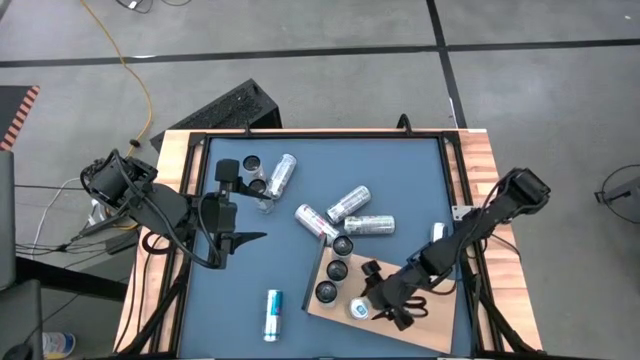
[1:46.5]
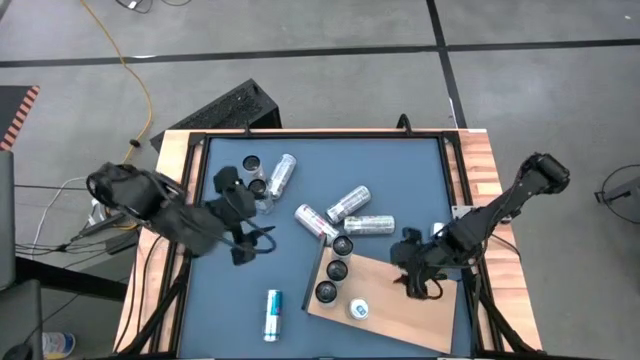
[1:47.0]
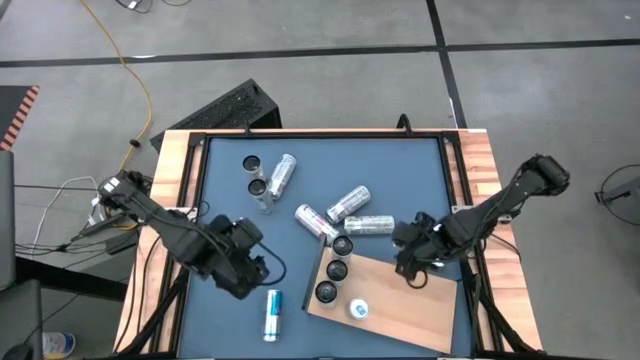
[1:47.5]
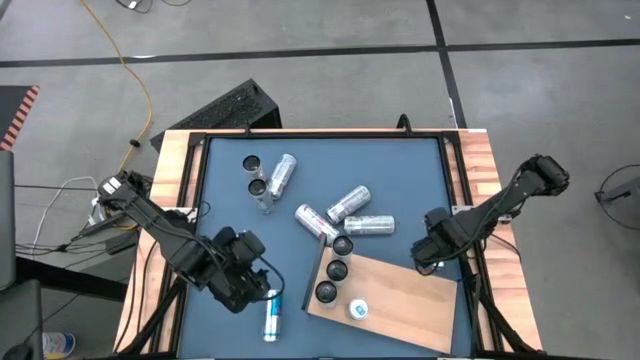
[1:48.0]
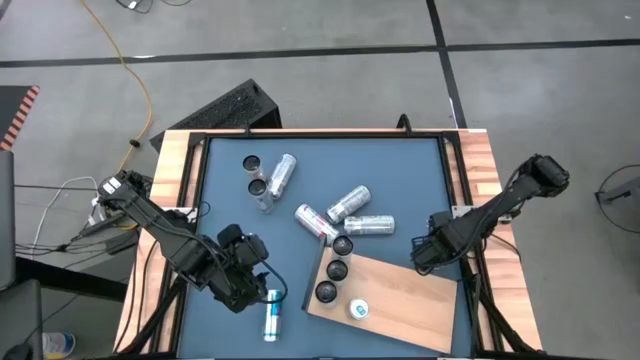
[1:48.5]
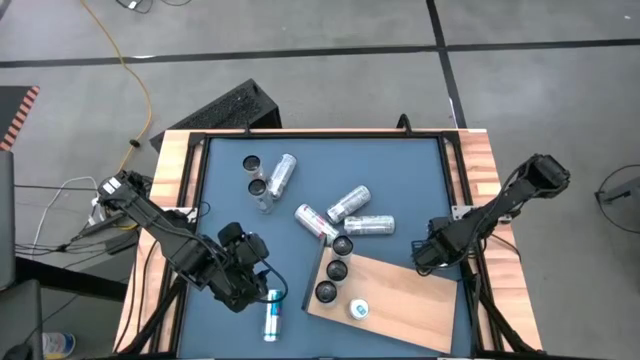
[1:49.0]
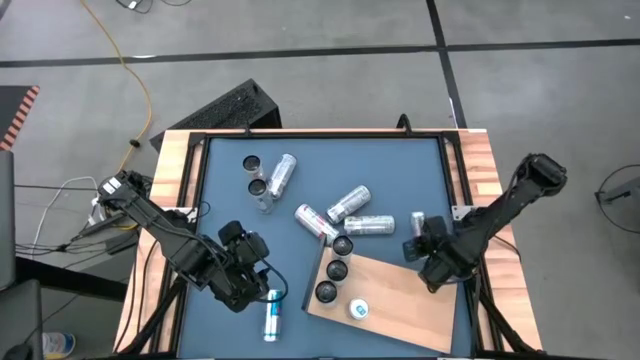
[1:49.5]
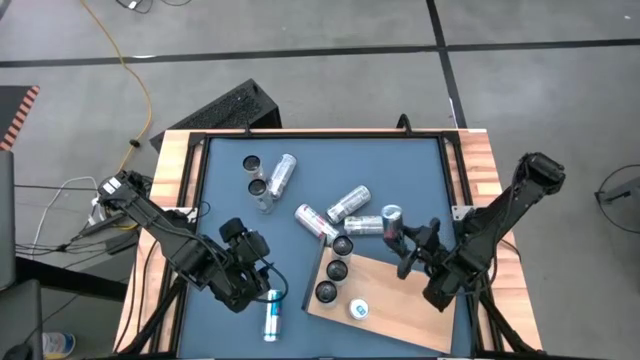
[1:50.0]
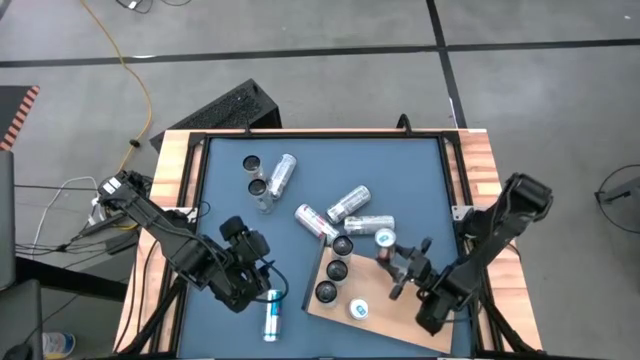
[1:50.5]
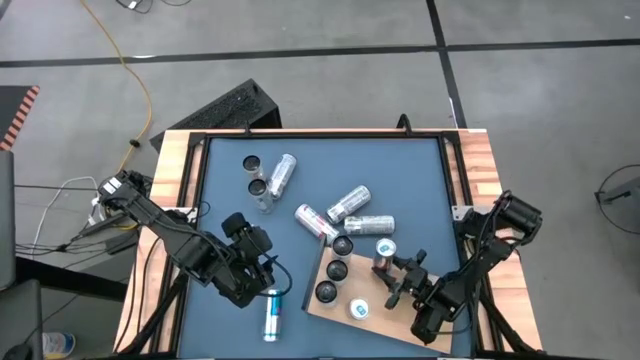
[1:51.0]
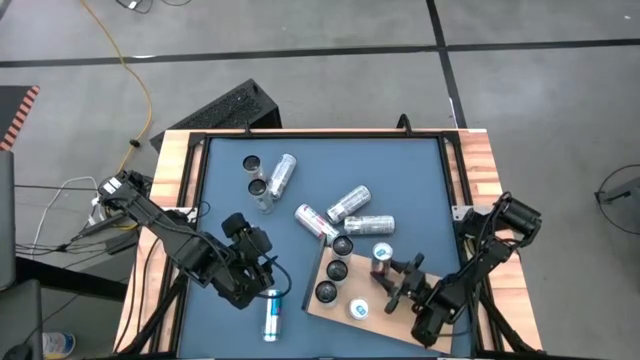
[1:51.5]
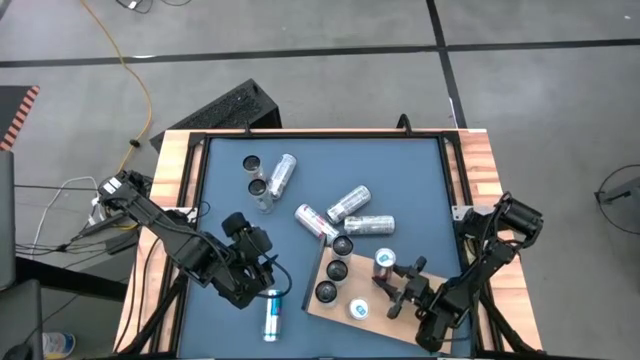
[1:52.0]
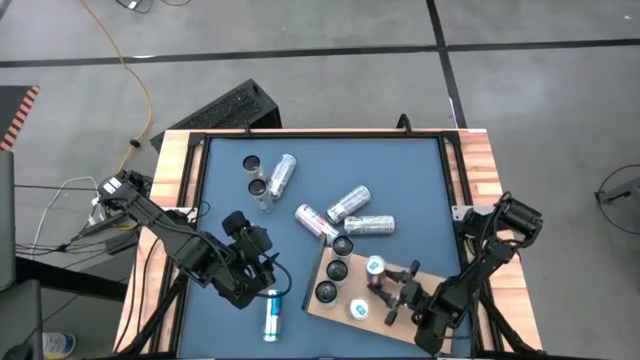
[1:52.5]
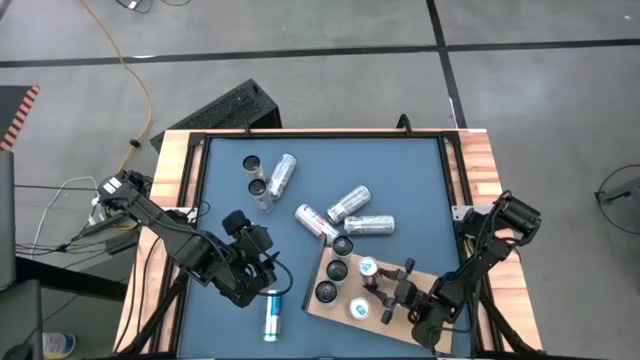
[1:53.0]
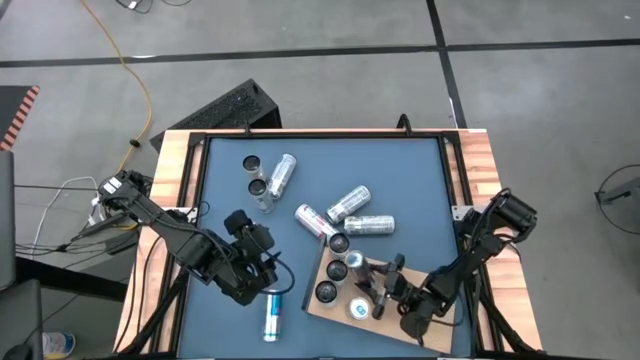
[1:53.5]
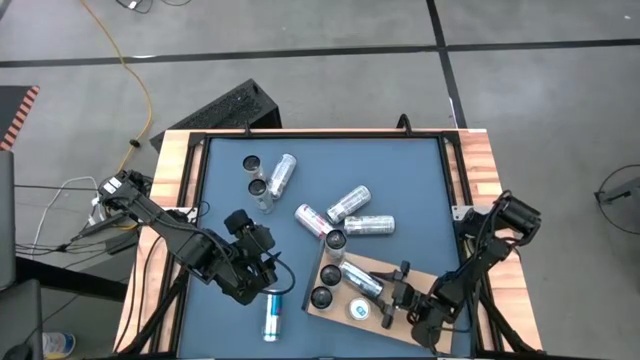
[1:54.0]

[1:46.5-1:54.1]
Task: Place canned beverage on shelf
Put the right blue soda can on the shelf

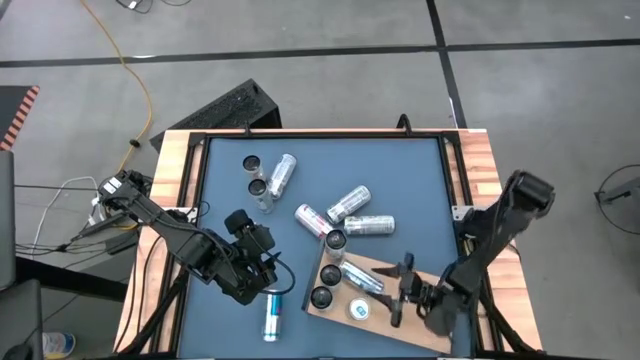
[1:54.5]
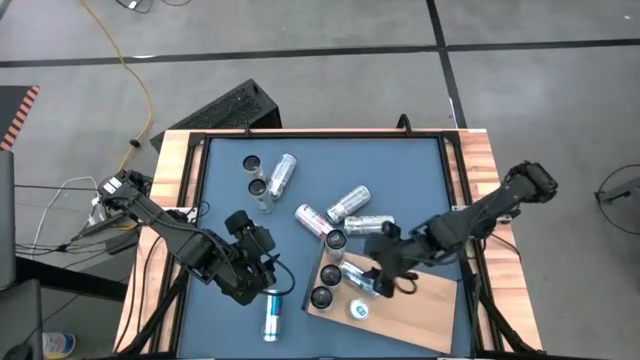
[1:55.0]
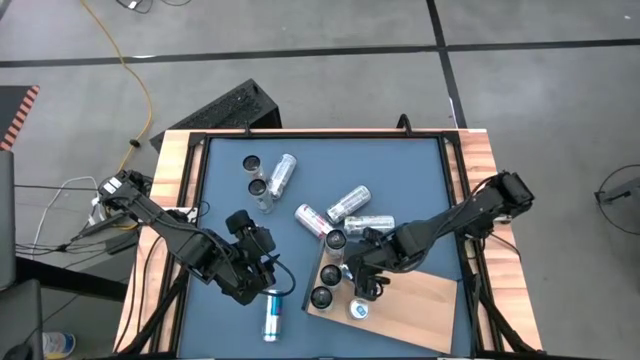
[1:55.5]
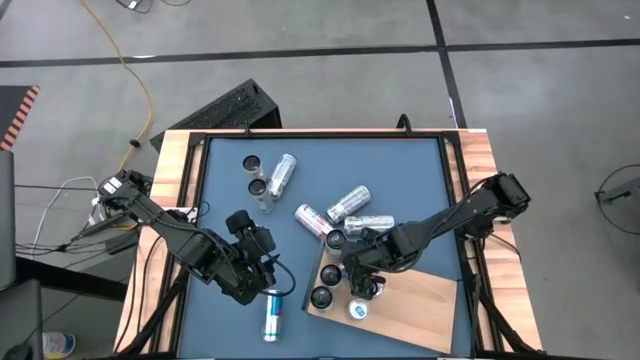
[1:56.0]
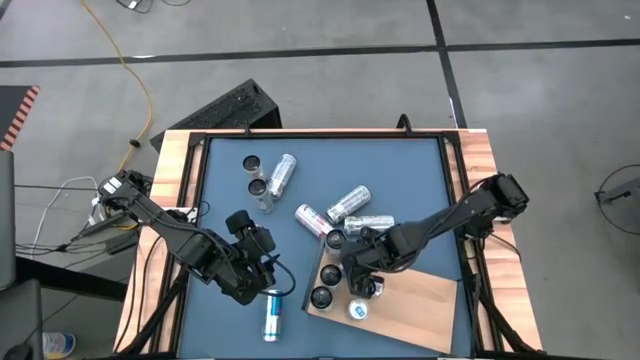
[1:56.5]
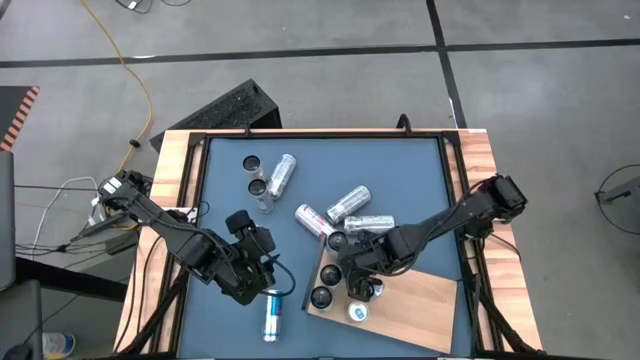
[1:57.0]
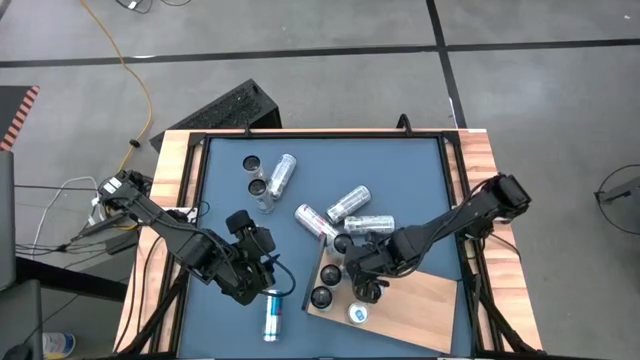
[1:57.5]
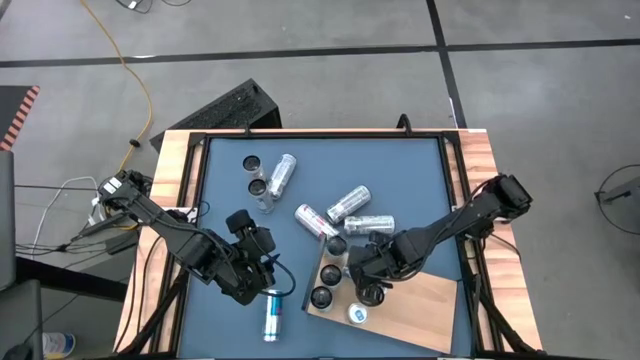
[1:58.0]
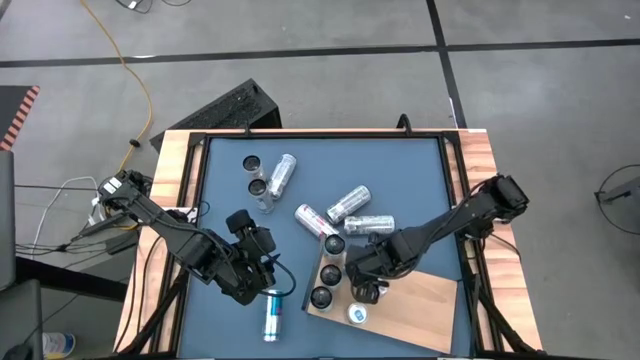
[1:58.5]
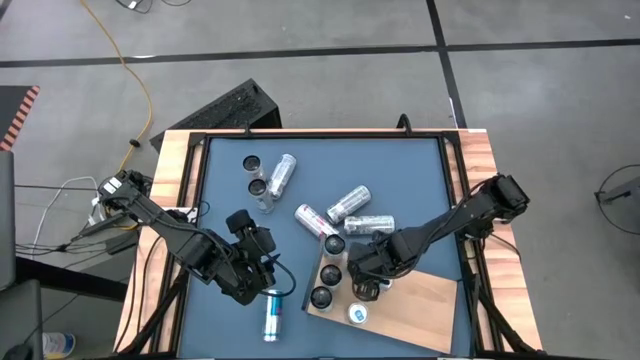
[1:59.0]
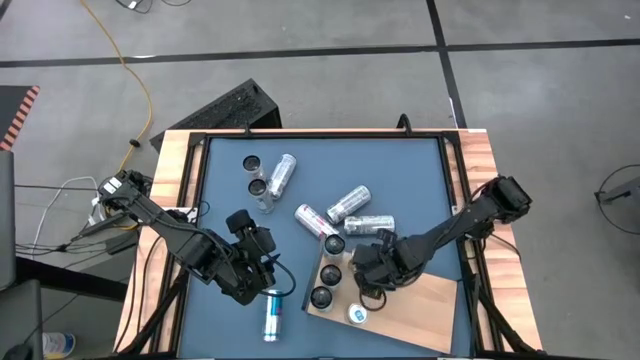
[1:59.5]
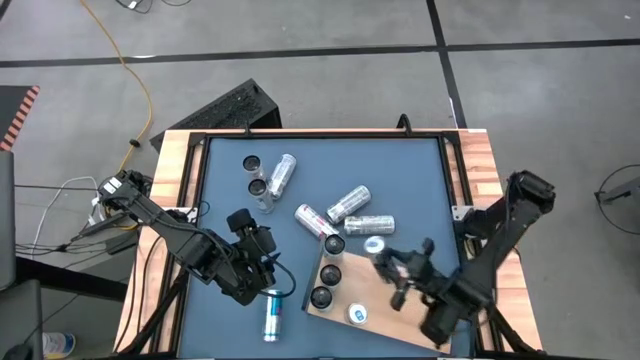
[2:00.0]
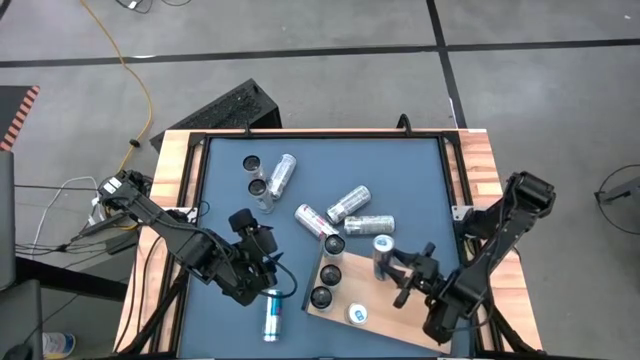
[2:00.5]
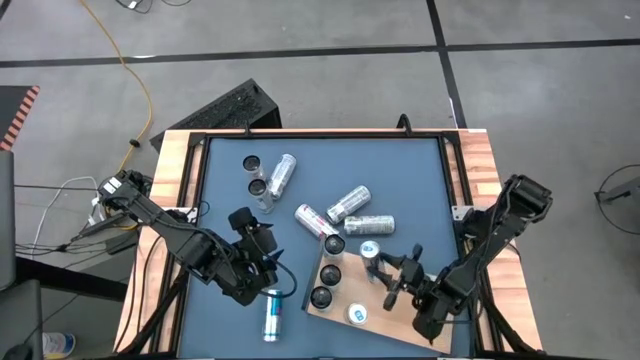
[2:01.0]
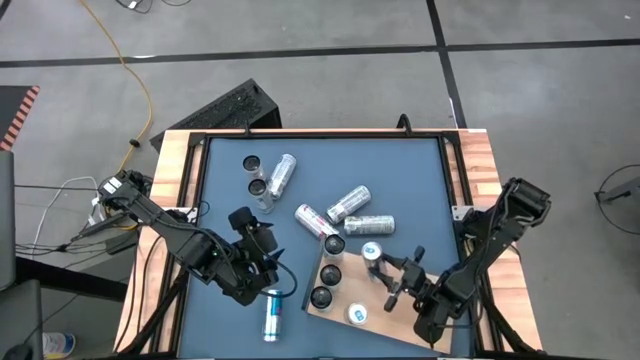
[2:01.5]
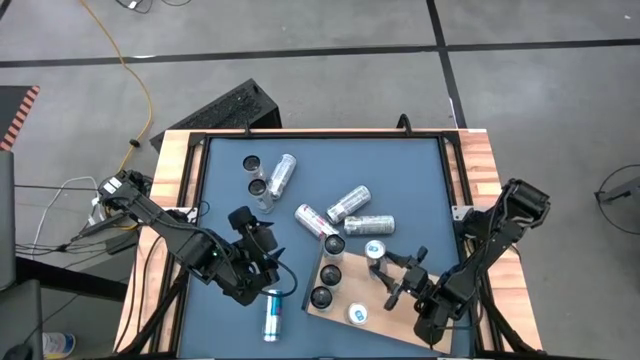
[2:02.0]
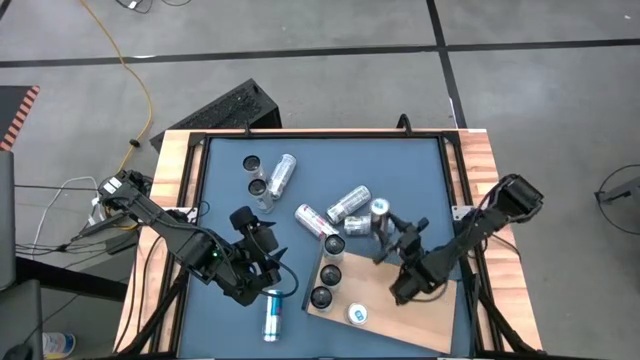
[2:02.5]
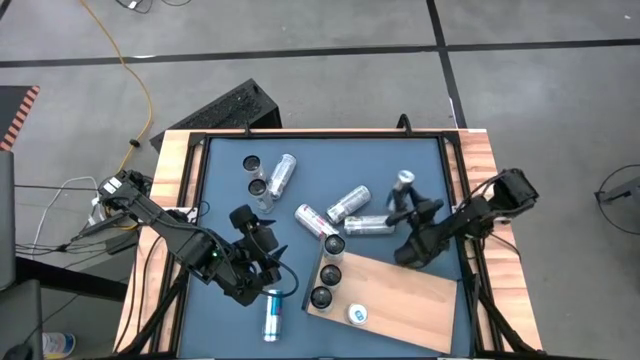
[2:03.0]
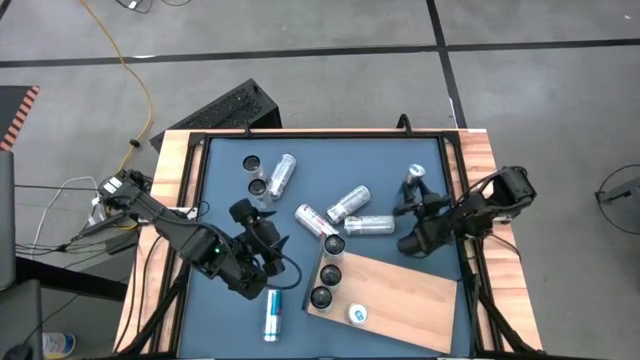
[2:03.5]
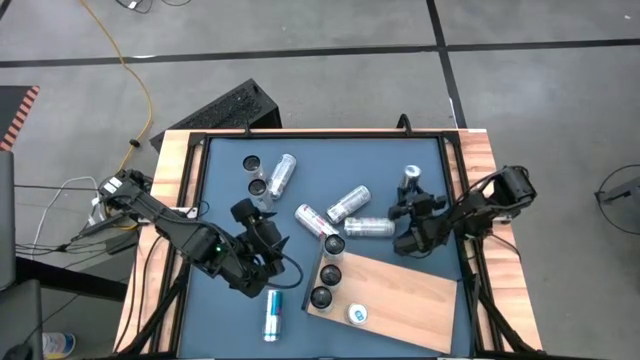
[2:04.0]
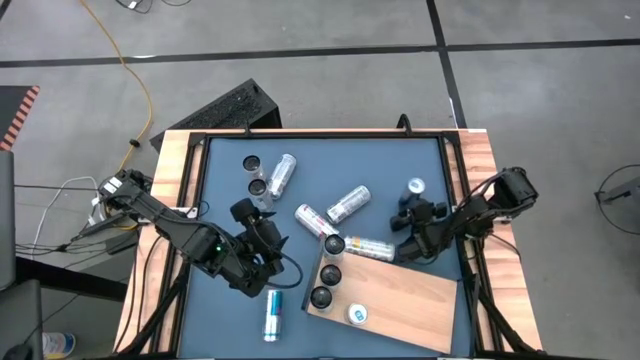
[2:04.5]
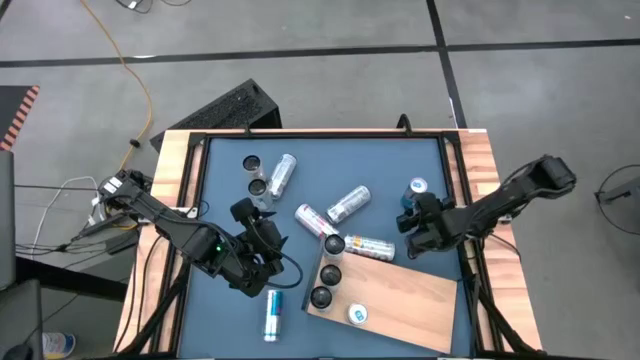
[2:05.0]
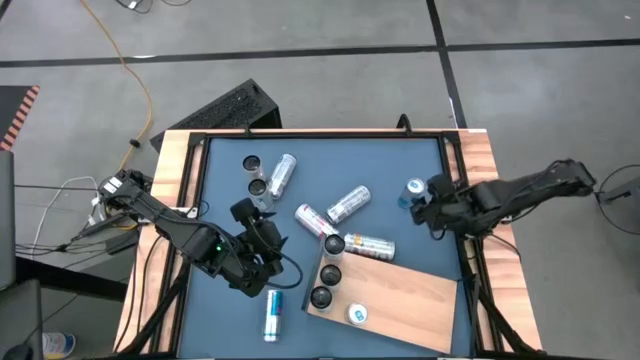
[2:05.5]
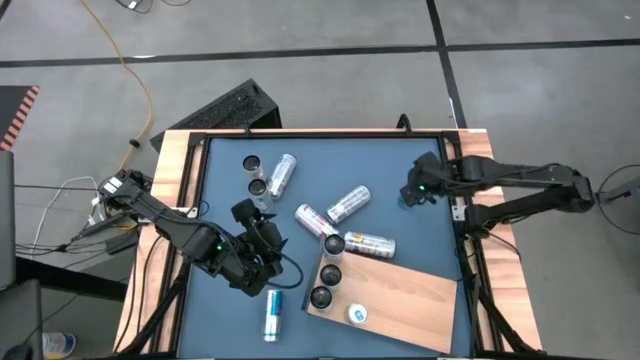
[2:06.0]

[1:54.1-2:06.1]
Put the right blue soda can on the shelf

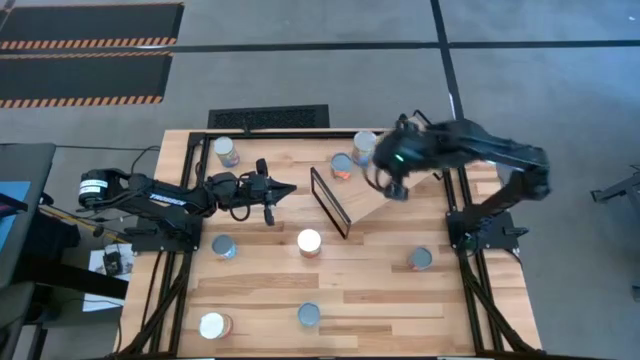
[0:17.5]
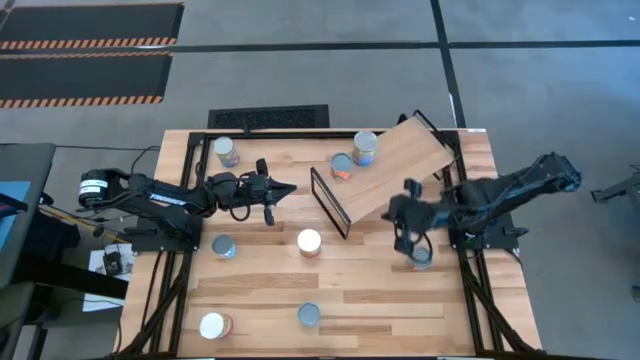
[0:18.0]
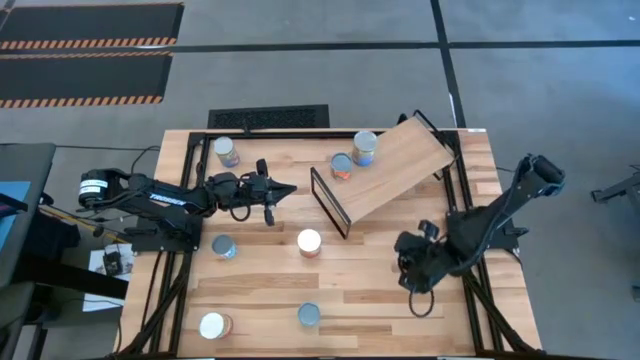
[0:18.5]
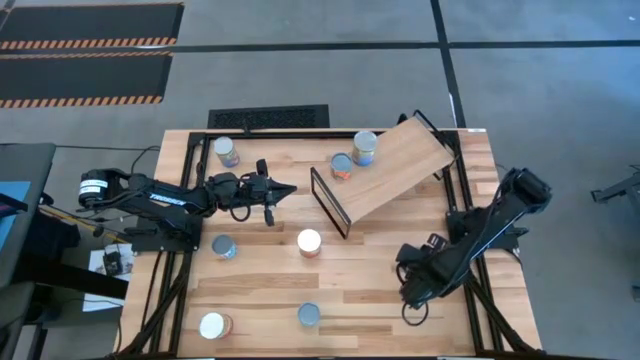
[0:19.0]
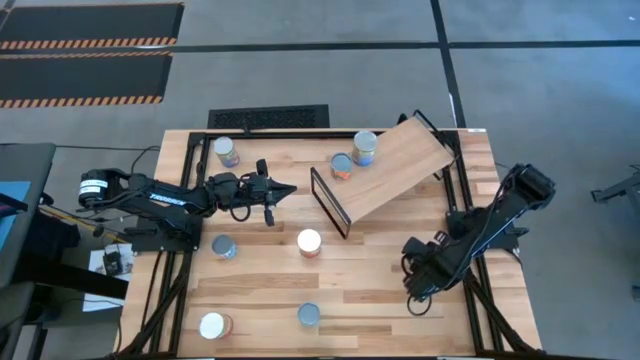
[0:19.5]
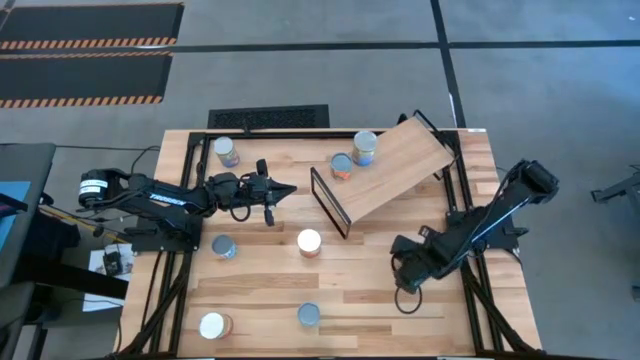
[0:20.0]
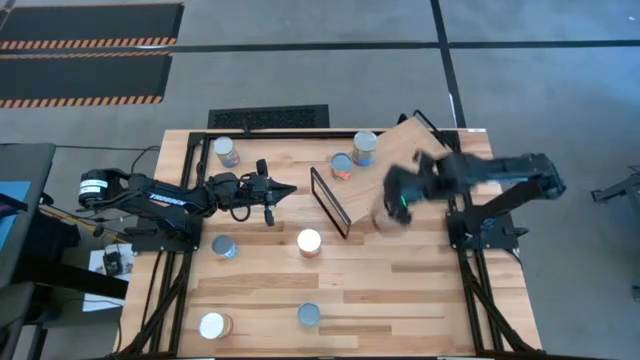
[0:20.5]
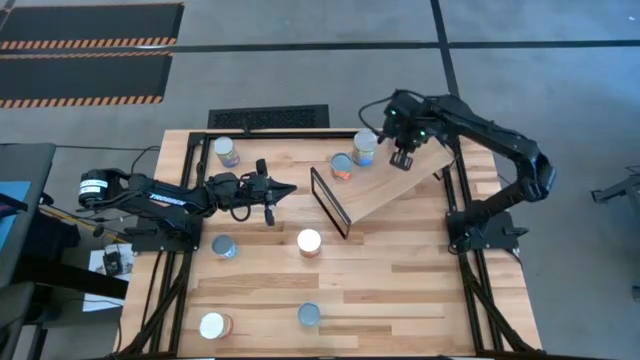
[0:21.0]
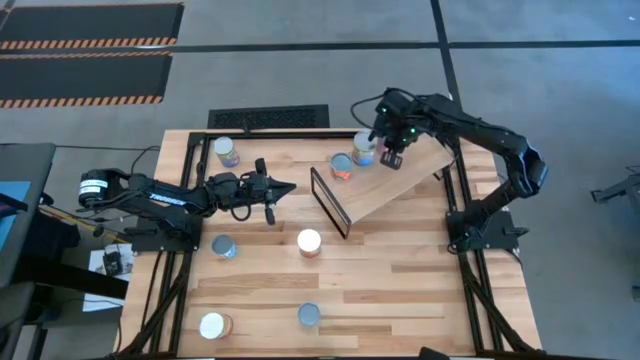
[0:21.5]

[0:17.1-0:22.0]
Task: Pick and place cans onto a shelf
Put the canned mixed vegetables on the shelf
